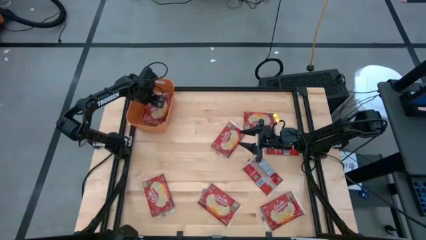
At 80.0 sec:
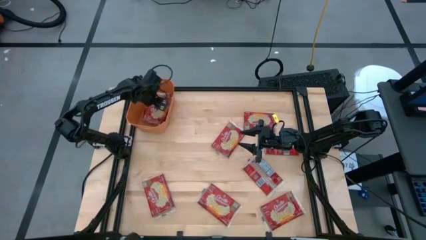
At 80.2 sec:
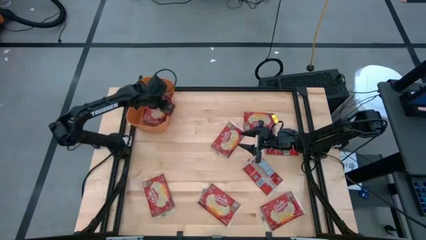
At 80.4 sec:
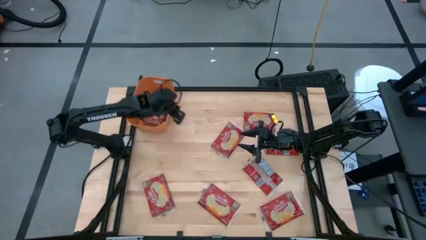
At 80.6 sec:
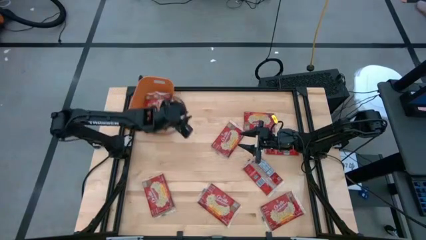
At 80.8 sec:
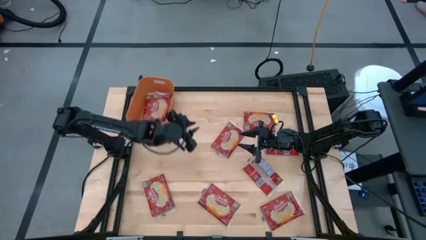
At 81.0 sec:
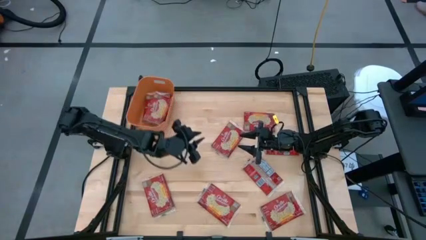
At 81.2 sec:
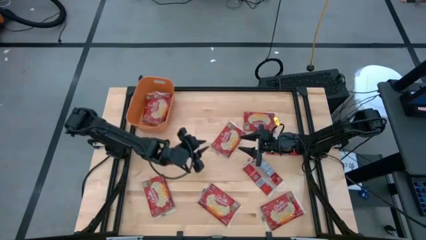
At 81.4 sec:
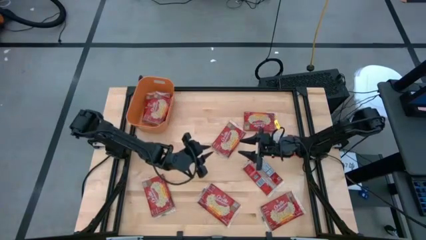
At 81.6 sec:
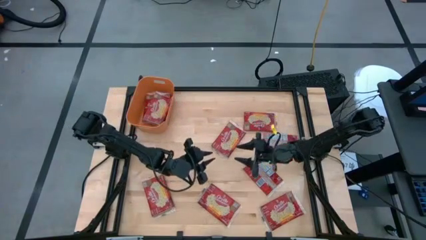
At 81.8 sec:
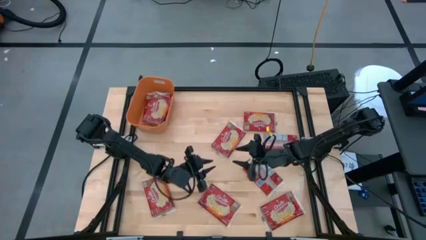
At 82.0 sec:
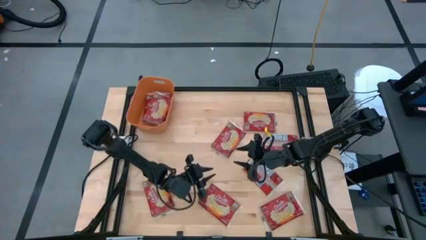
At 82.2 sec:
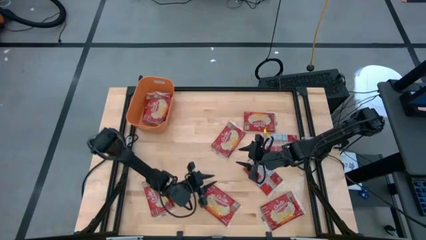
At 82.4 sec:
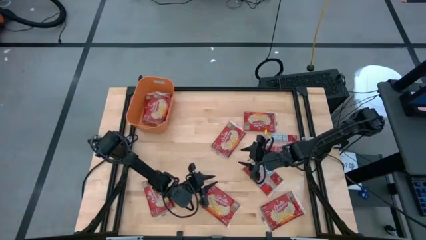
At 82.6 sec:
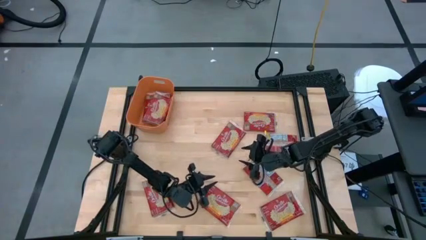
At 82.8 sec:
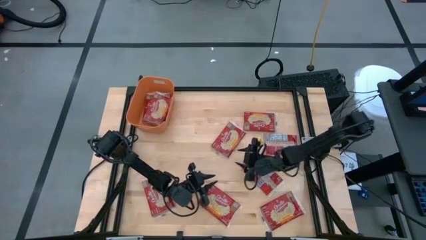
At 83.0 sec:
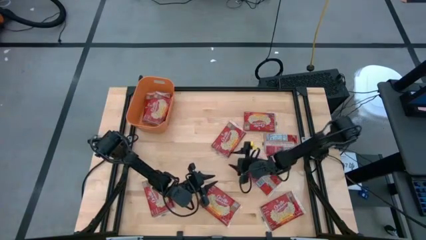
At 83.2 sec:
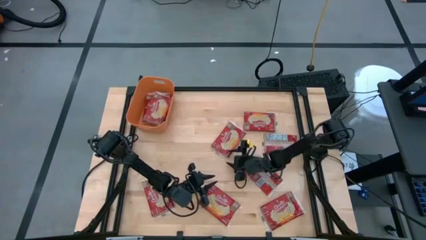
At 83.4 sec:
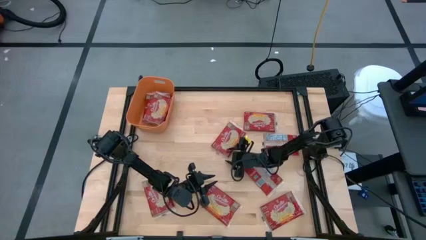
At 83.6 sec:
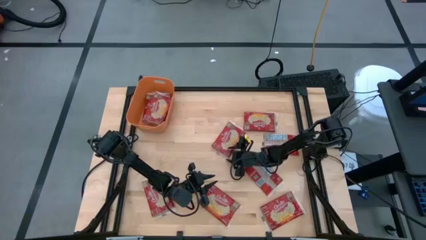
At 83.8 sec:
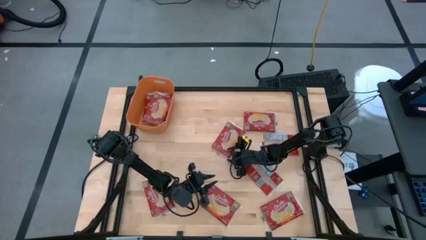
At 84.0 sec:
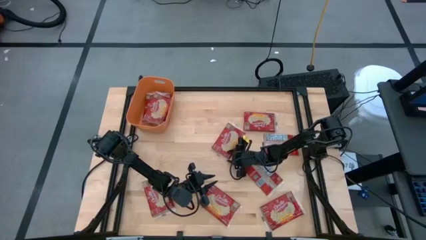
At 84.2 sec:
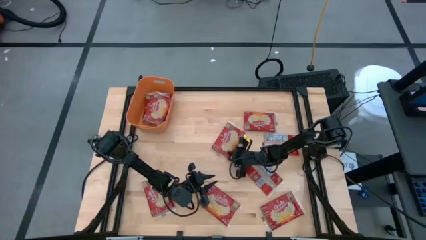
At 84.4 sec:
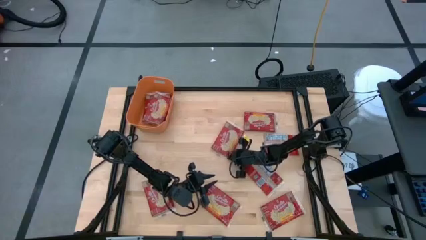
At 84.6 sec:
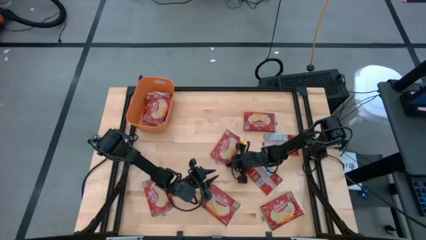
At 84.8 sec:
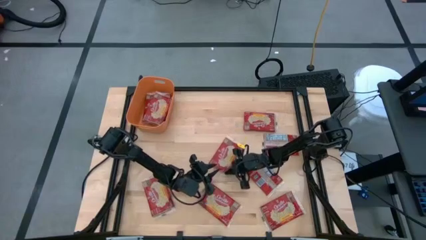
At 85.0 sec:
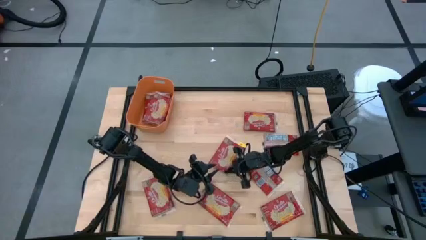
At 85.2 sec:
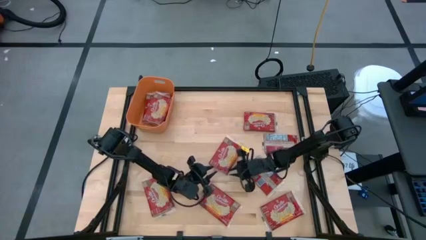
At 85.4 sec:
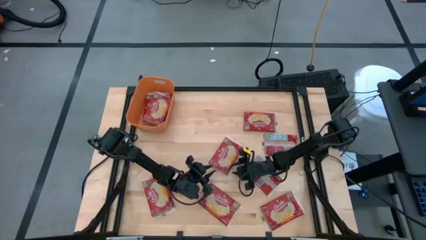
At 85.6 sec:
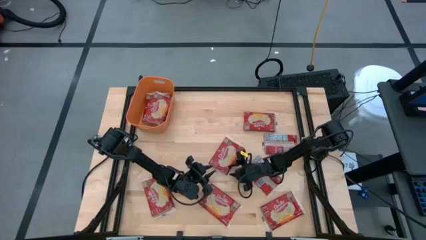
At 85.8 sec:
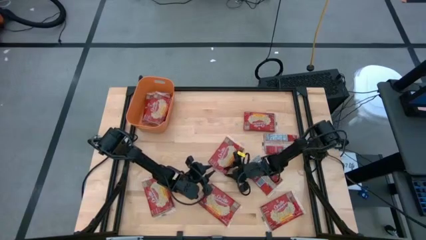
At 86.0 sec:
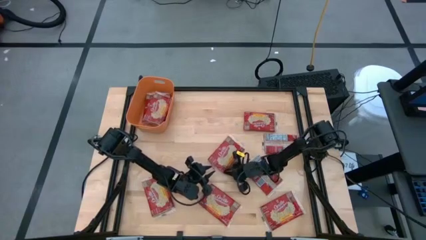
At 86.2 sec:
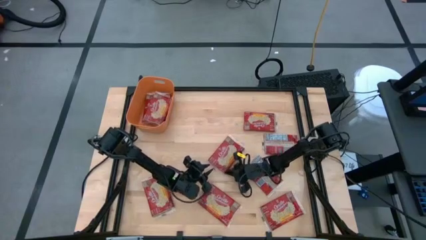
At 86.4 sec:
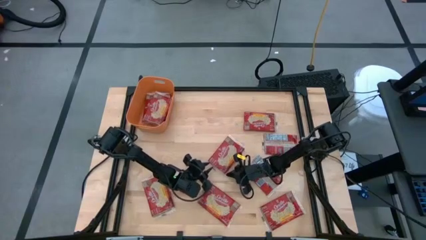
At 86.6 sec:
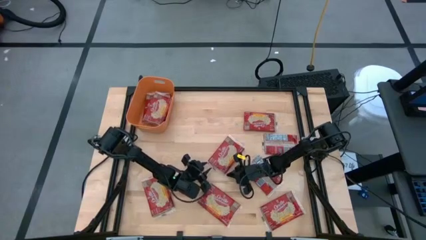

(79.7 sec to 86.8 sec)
Task: Sort popcorn bags into baskets
Put the red popcorn bag into the orange bin

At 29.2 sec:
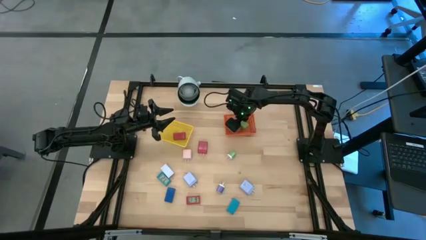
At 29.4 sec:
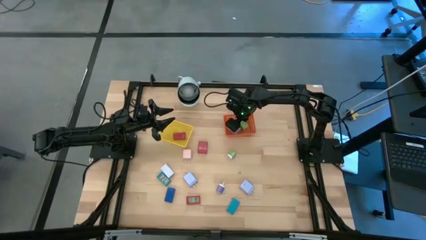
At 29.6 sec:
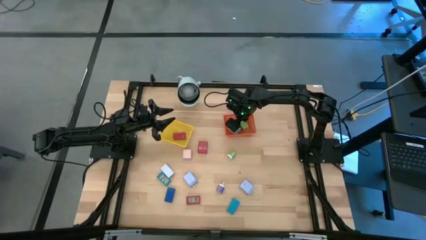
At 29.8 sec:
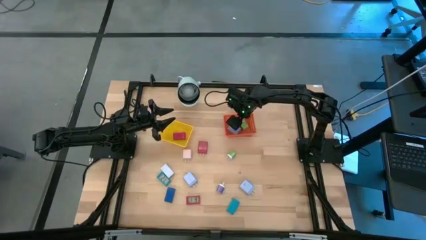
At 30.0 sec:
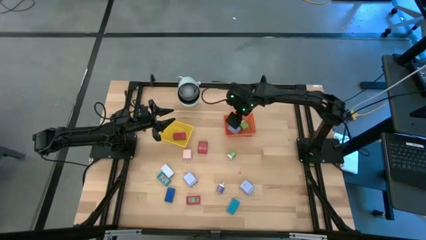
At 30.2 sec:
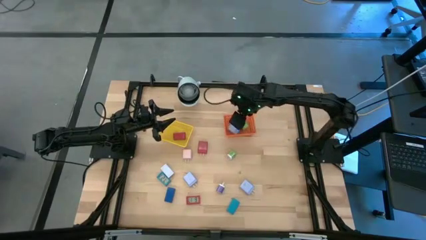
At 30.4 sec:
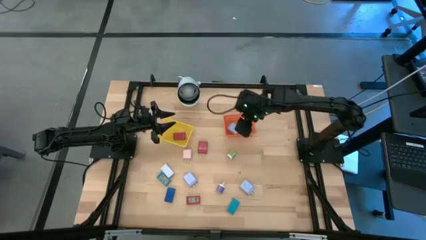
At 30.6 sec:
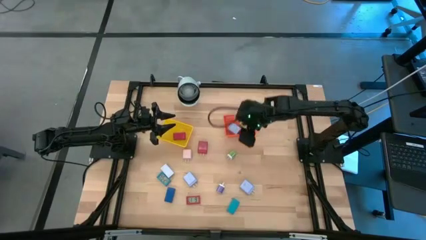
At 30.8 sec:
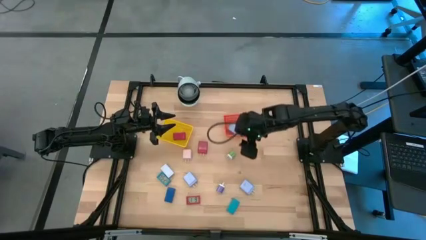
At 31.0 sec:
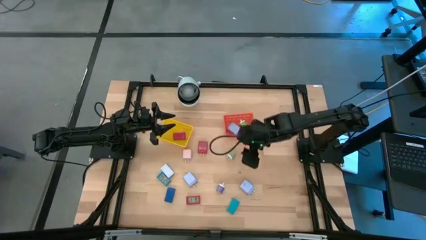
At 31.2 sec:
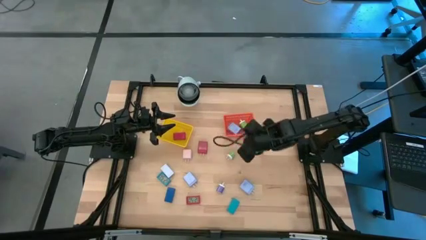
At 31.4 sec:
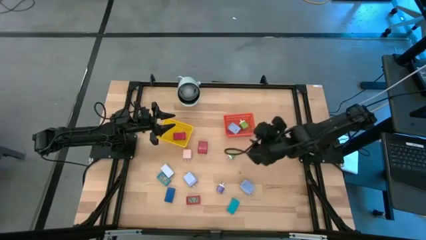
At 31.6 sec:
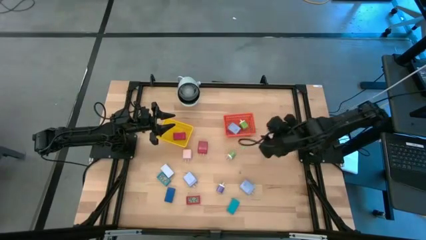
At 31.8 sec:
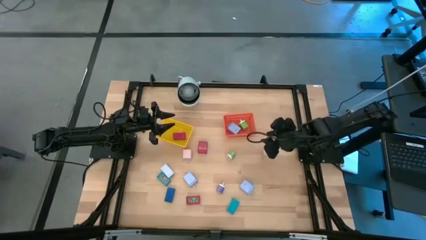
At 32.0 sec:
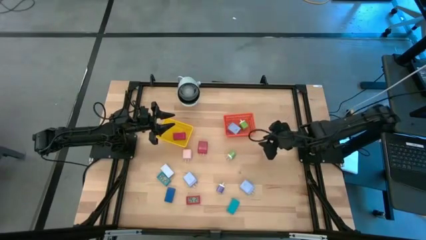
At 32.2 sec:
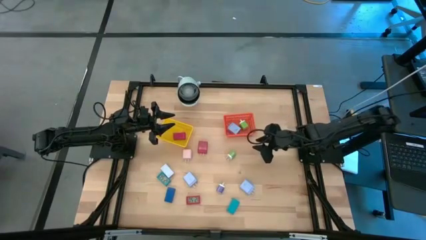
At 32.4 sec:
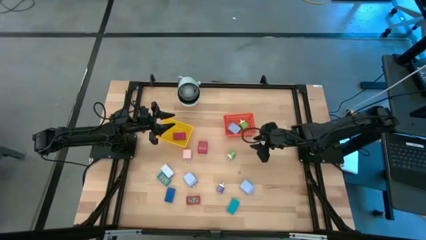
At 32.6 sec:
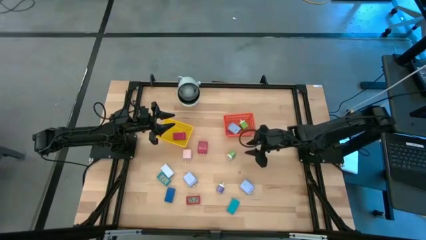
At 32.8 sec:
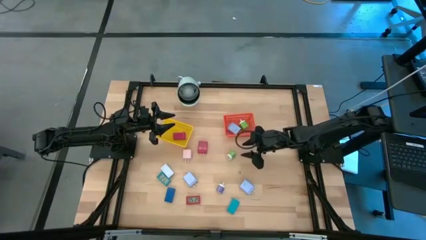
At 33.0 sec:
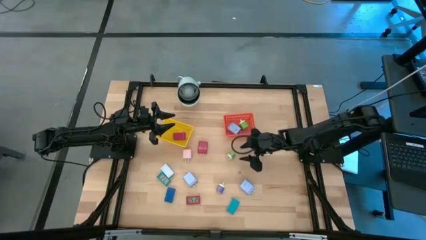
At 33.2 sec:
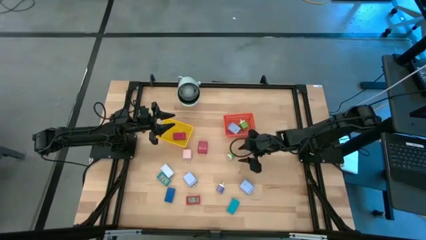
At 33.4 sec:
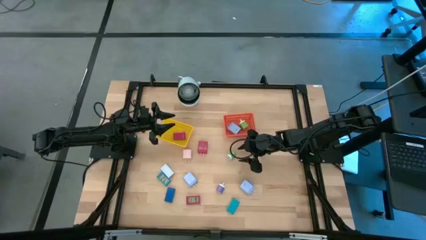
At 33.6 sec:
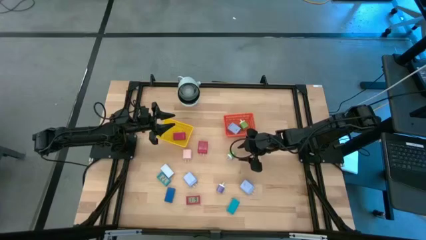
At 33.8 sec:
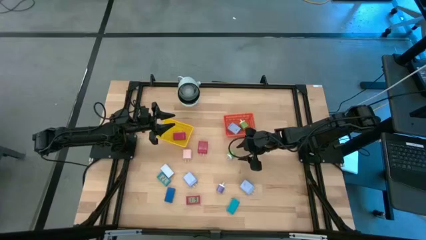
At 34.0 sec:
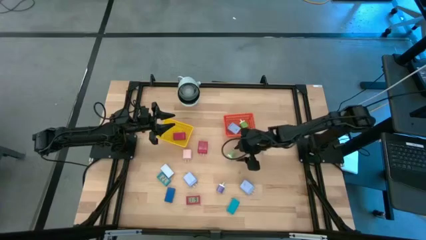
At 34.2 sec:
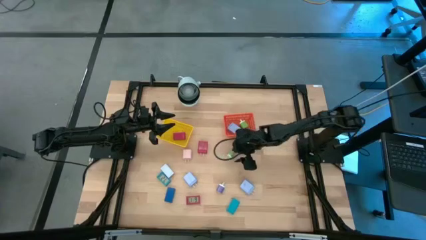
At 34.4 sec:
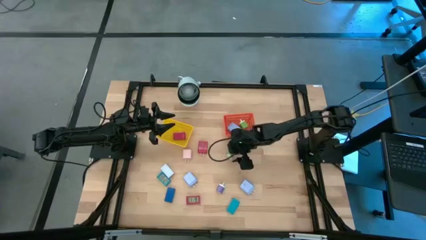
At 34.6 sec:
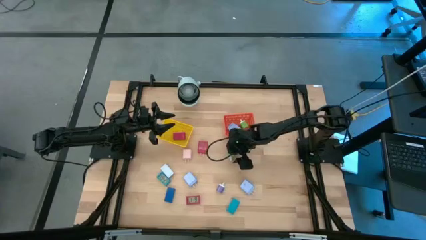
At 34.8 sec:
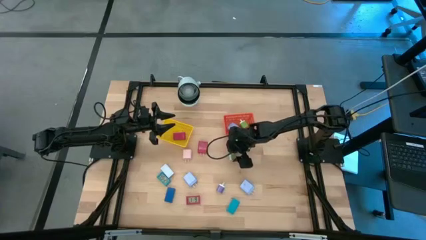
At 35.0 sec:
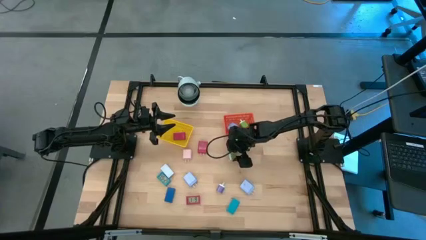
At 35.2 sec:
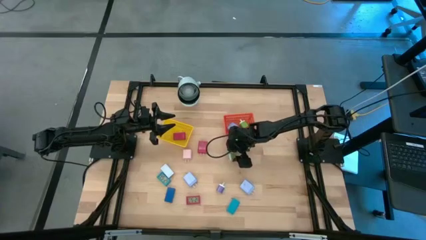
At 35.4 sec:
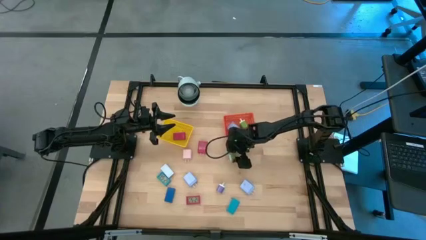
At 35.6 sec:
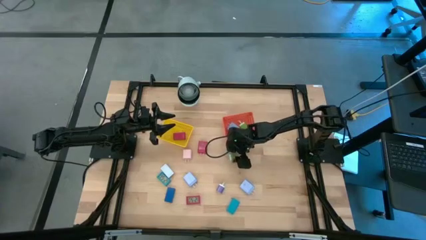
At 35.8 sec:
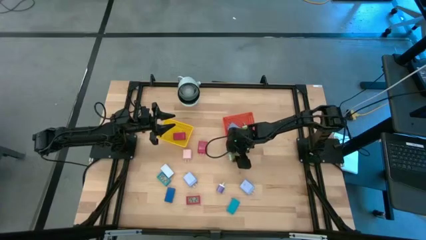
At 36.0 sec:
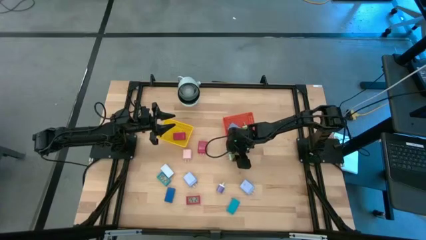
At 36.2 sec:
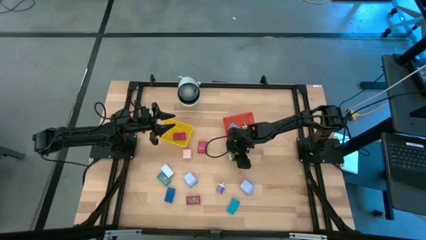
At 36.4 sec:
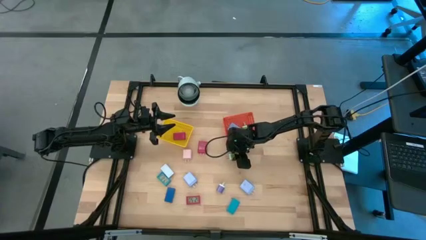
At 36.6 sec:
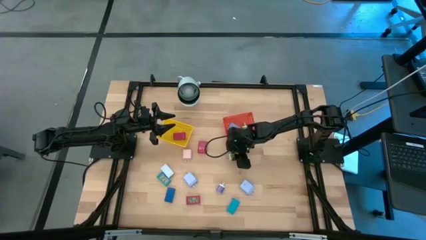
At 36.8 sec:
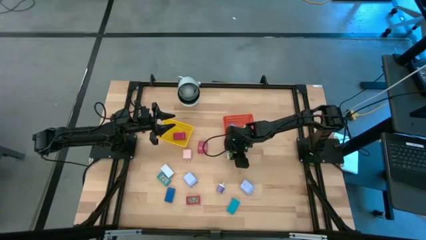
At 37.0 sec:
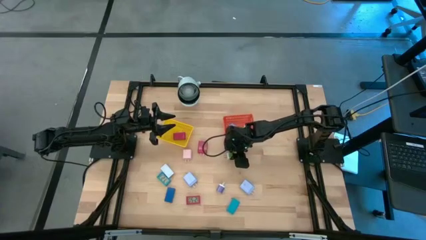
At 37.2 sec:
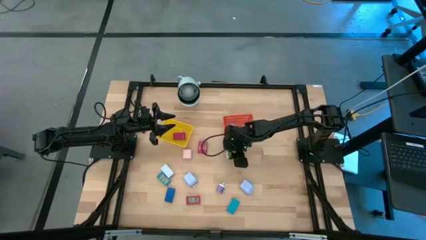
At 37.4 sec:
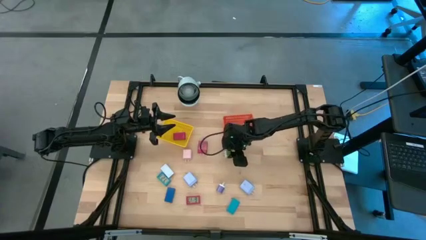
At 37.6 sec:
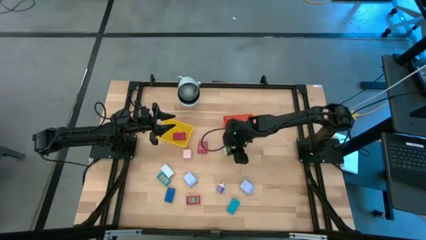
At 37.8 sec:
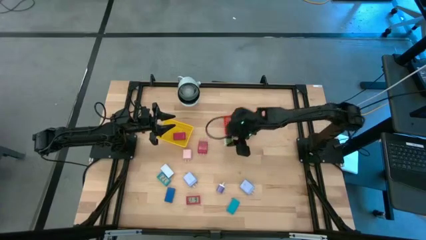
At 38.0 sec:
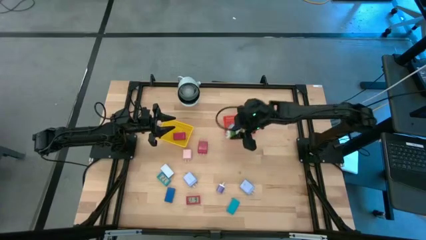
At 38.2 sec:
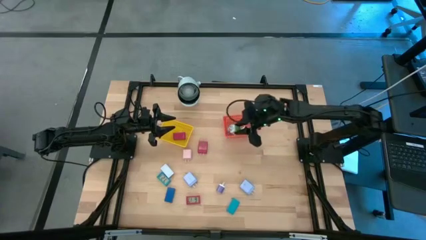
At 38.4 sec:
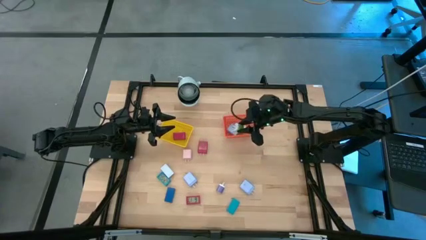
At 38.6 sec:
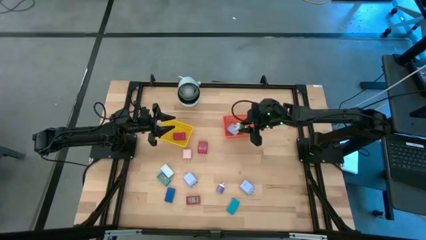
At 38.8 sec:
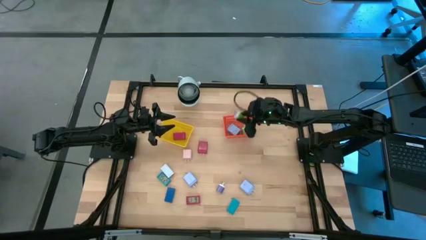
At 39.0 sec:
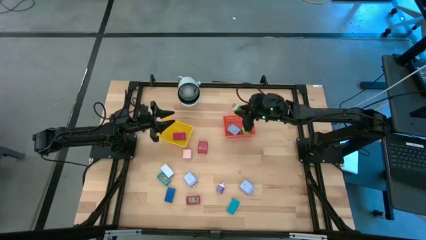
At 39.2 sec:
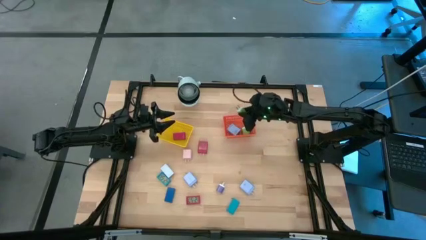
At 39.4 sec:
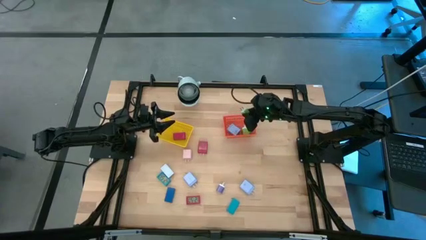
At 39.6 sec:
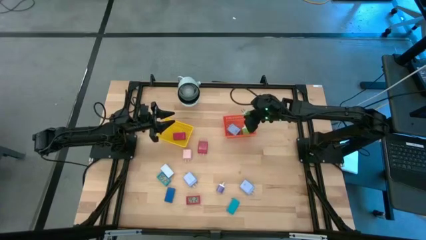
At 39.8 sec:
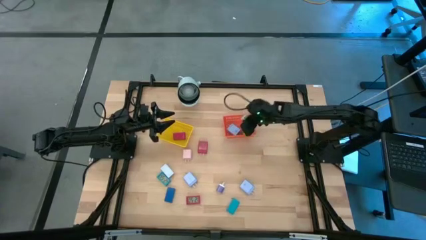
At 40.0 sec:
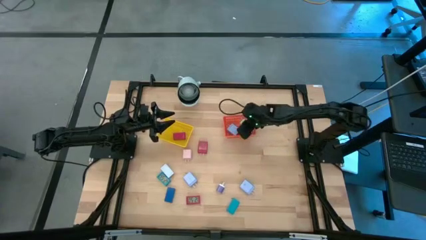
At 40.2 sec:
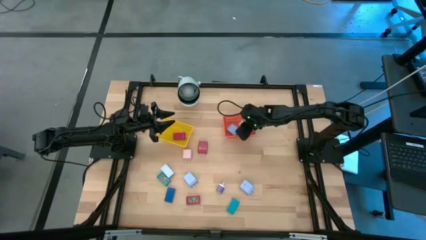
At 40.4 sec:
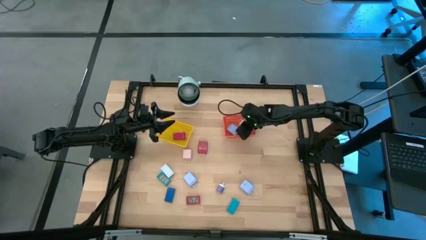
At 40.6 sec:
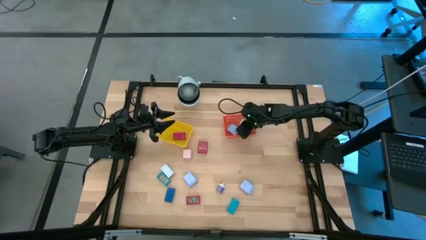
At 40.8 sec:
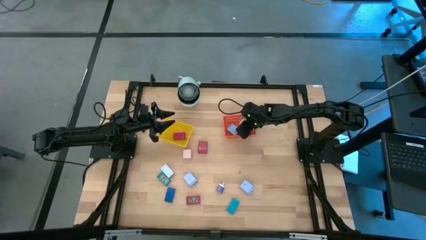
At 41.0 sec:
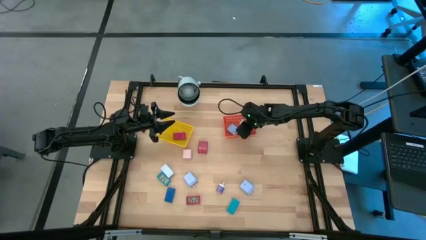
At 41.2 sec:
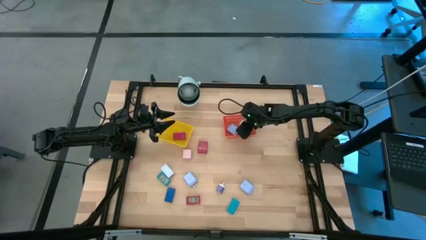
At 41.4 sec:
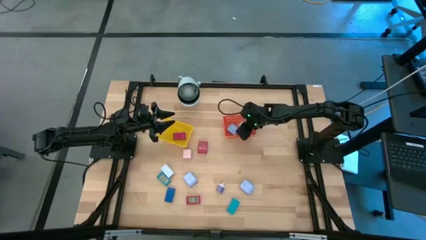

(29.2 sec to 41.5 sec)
Task: Pick & Place Office items
Put the green charger adapter into the orange bin
